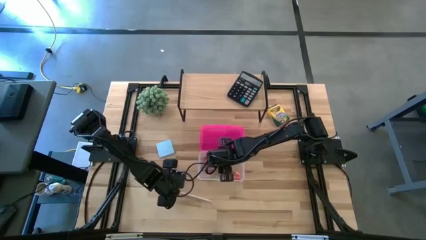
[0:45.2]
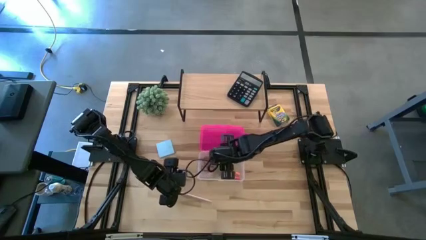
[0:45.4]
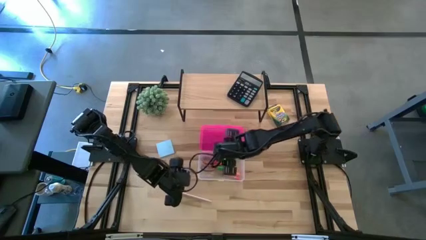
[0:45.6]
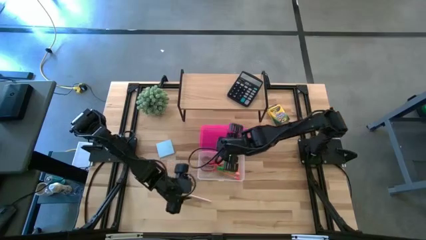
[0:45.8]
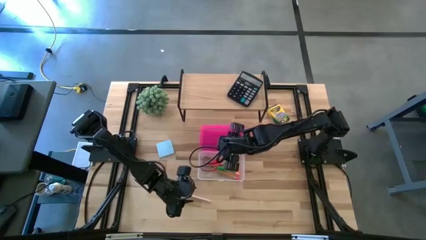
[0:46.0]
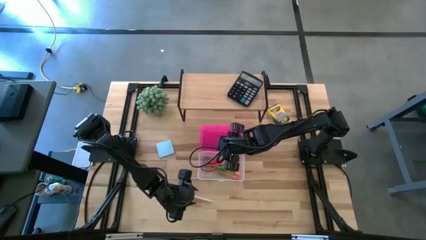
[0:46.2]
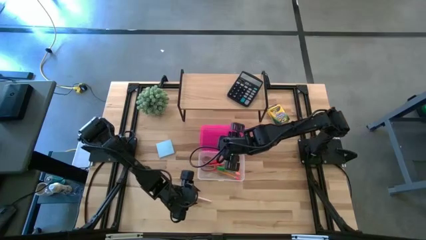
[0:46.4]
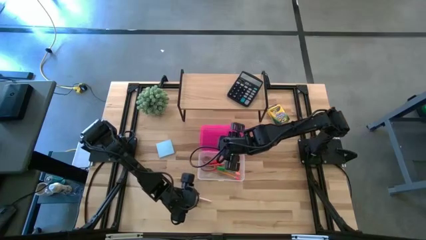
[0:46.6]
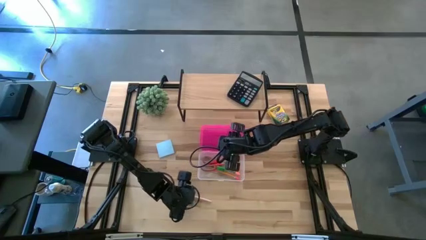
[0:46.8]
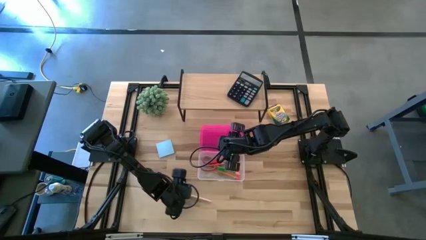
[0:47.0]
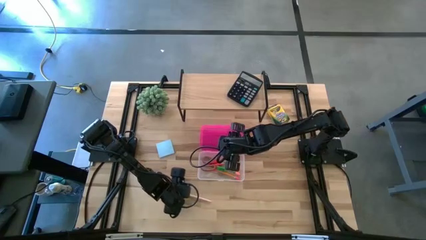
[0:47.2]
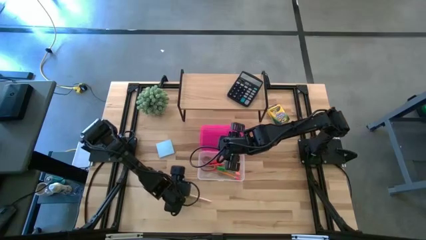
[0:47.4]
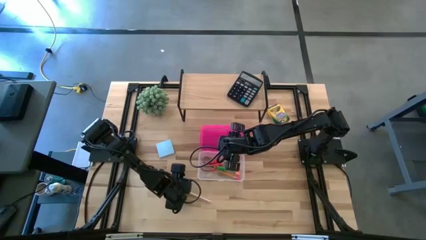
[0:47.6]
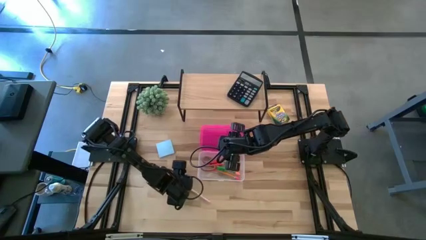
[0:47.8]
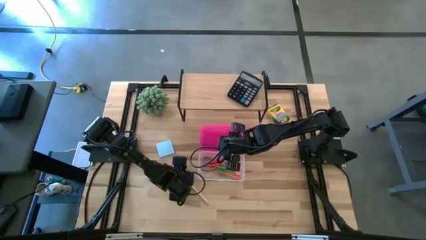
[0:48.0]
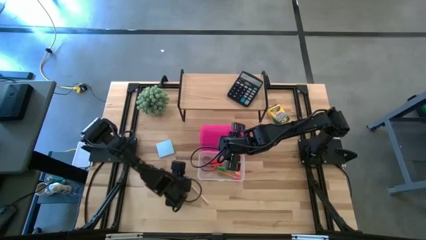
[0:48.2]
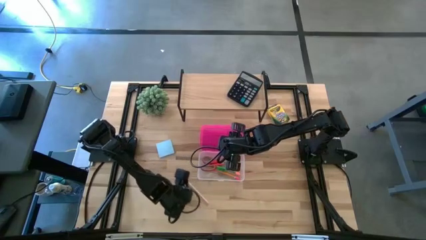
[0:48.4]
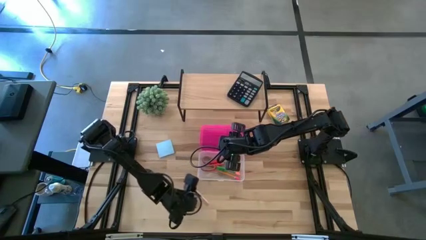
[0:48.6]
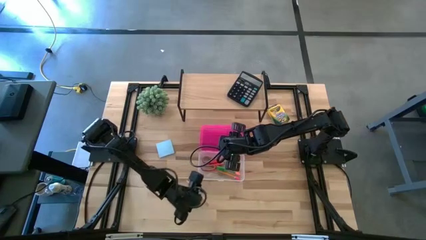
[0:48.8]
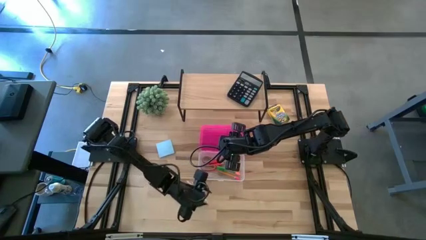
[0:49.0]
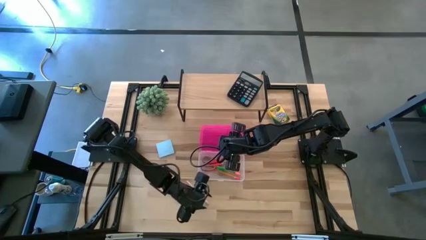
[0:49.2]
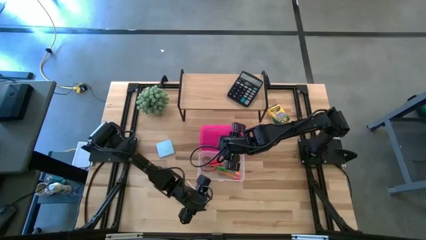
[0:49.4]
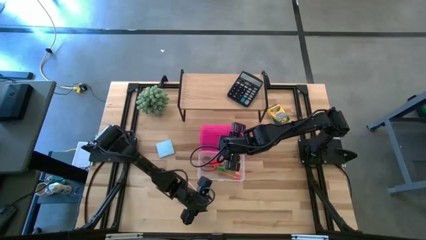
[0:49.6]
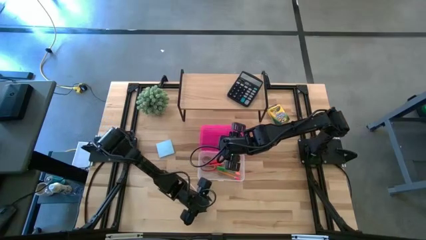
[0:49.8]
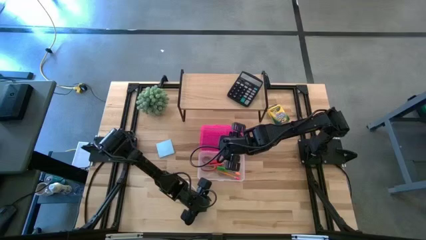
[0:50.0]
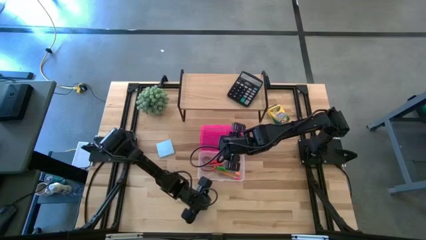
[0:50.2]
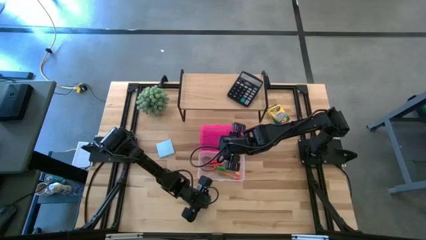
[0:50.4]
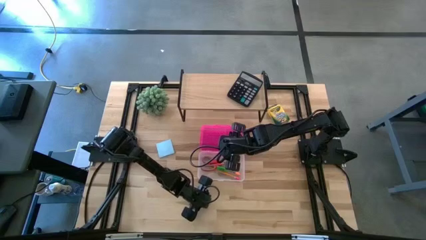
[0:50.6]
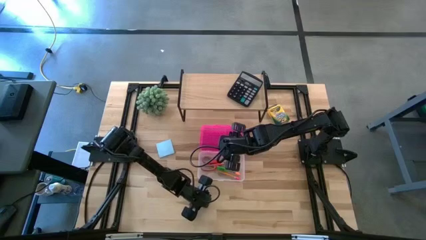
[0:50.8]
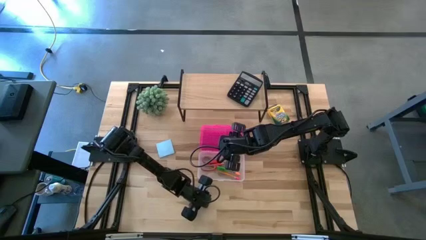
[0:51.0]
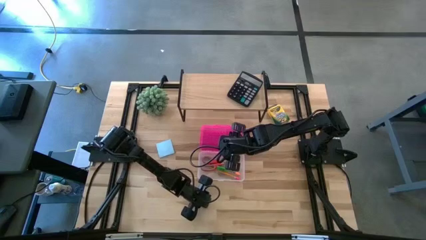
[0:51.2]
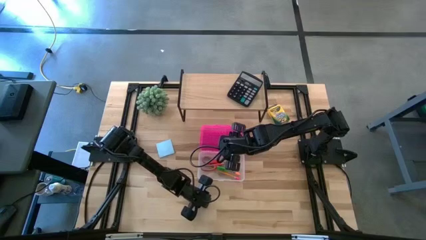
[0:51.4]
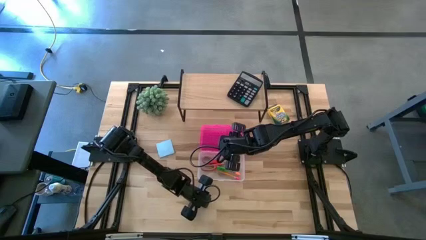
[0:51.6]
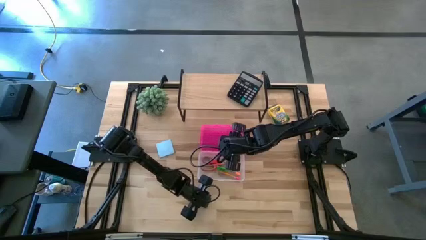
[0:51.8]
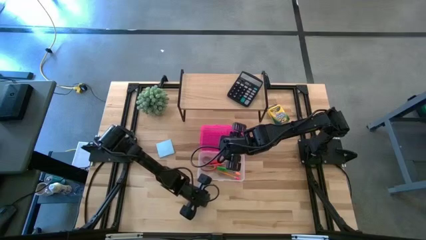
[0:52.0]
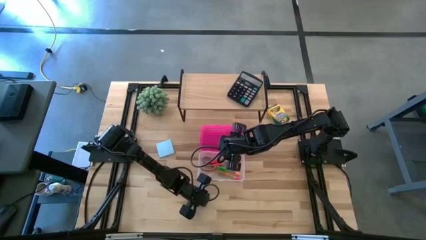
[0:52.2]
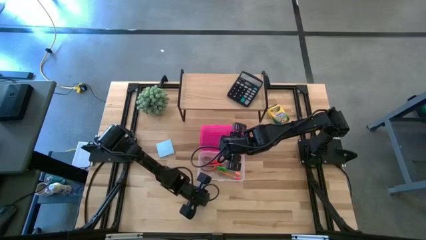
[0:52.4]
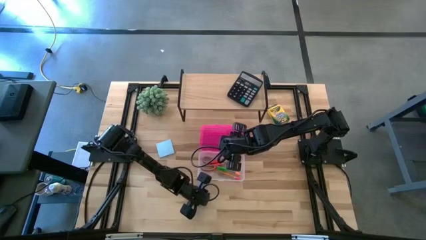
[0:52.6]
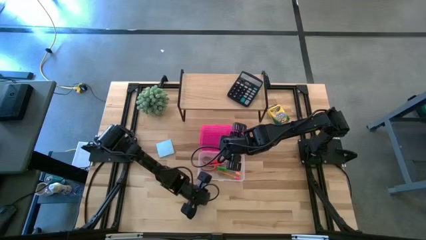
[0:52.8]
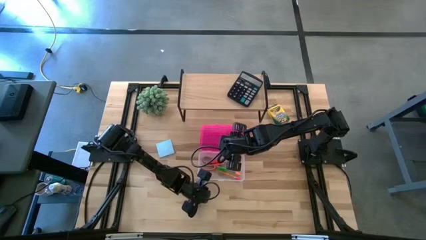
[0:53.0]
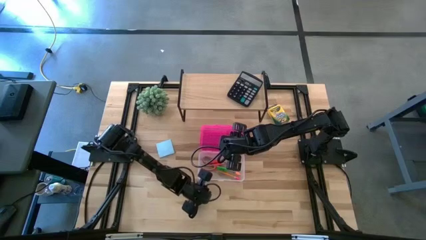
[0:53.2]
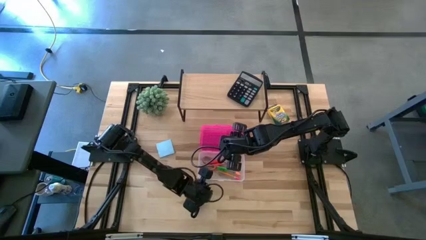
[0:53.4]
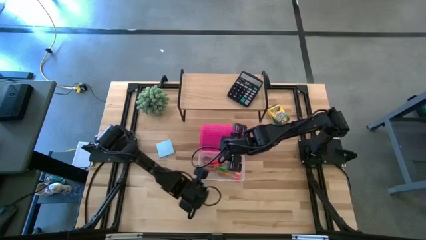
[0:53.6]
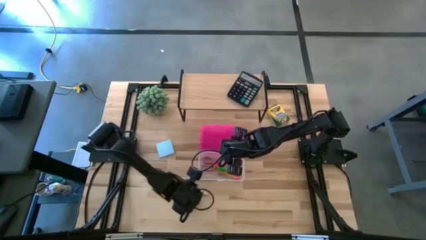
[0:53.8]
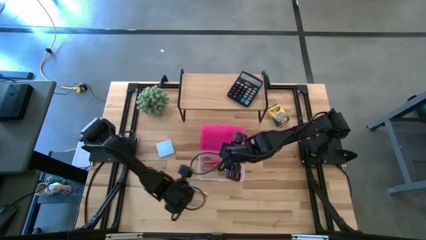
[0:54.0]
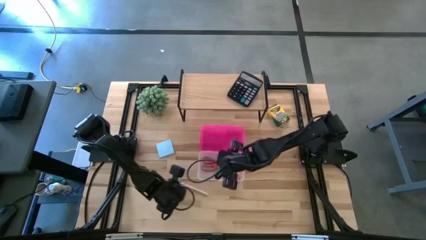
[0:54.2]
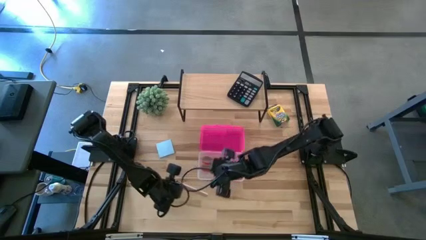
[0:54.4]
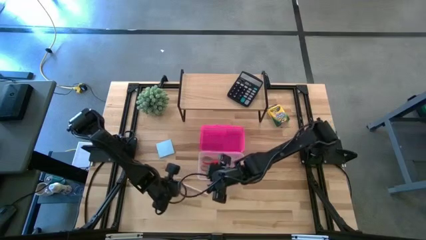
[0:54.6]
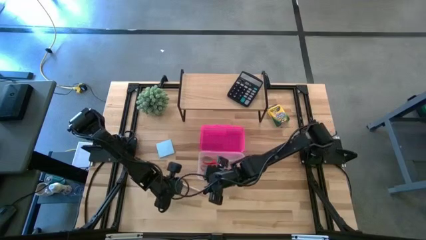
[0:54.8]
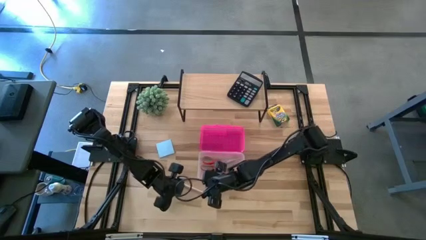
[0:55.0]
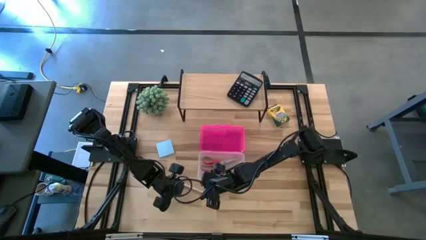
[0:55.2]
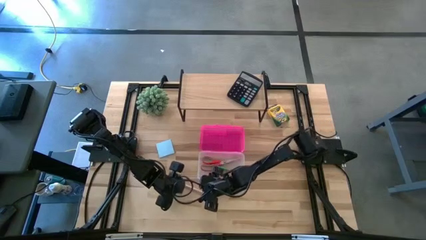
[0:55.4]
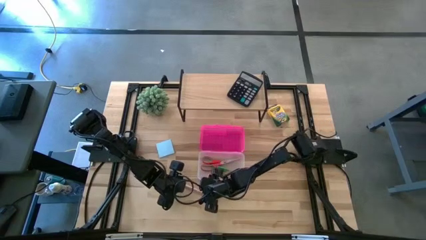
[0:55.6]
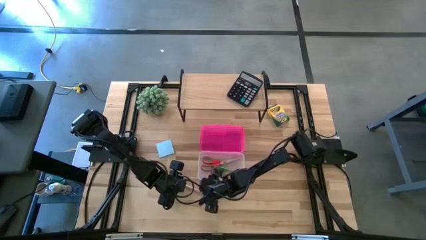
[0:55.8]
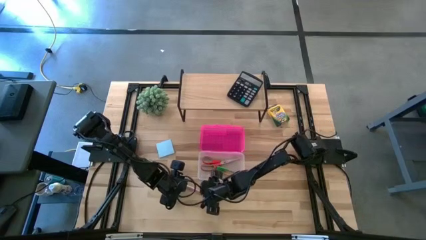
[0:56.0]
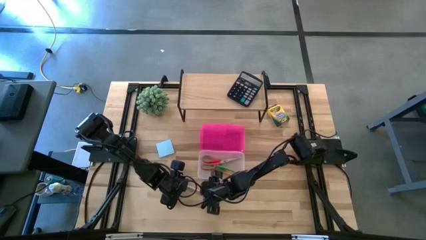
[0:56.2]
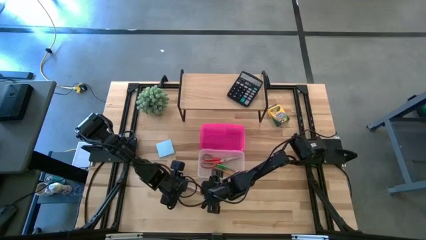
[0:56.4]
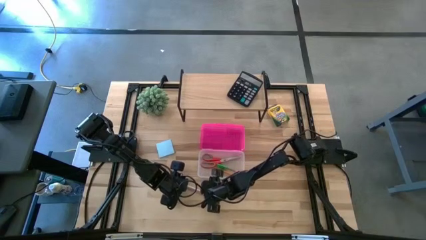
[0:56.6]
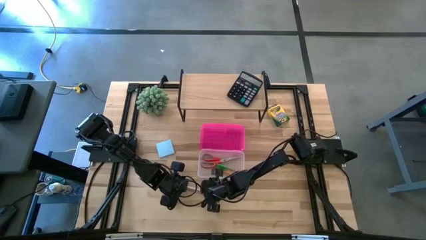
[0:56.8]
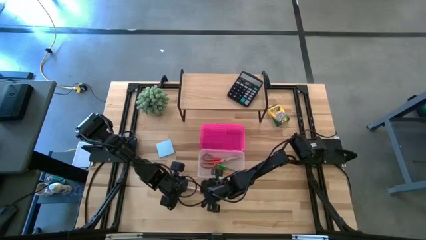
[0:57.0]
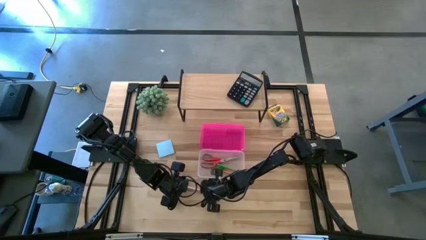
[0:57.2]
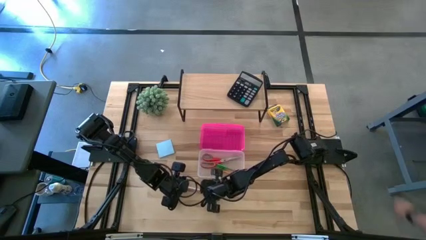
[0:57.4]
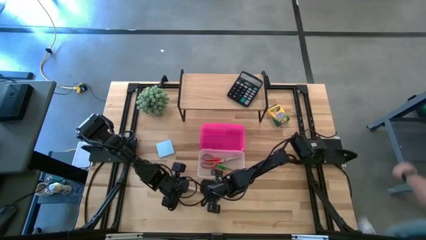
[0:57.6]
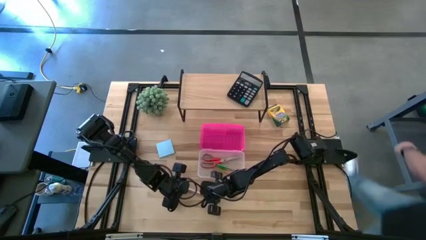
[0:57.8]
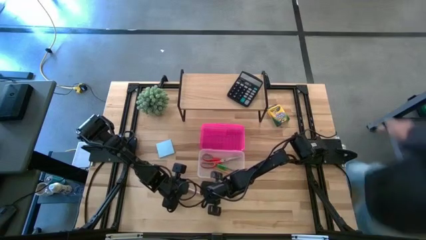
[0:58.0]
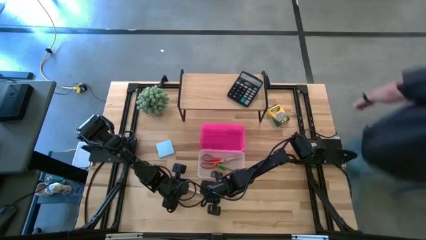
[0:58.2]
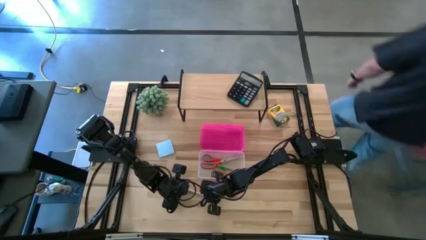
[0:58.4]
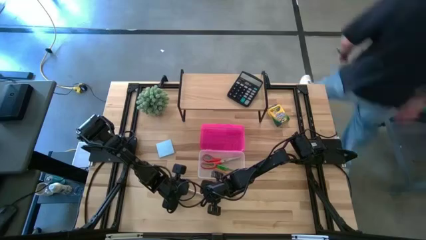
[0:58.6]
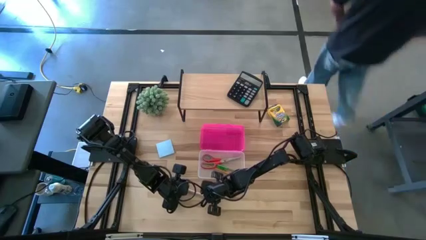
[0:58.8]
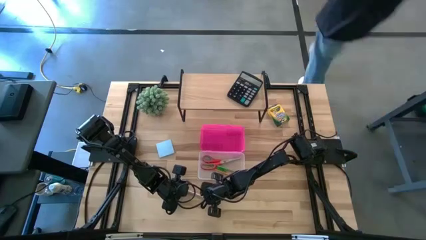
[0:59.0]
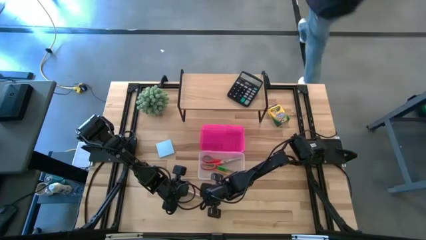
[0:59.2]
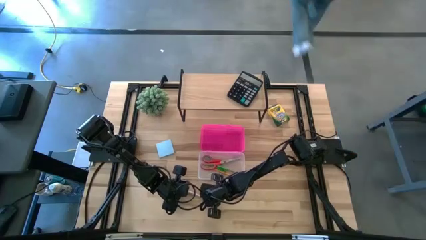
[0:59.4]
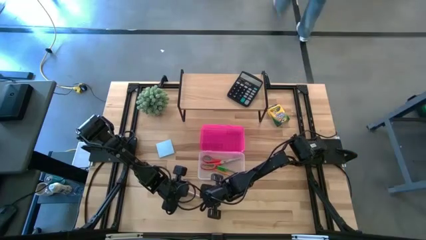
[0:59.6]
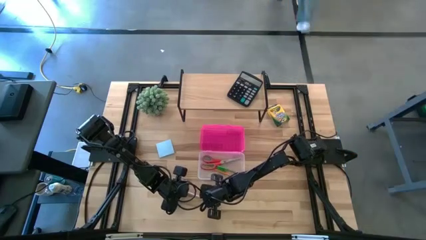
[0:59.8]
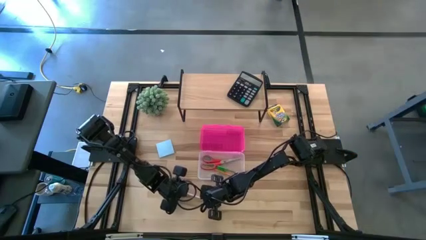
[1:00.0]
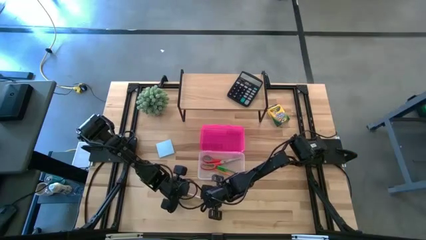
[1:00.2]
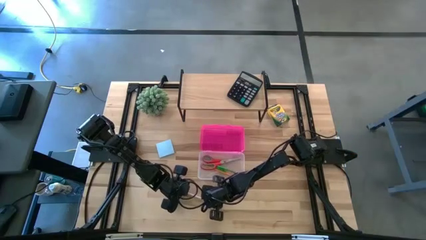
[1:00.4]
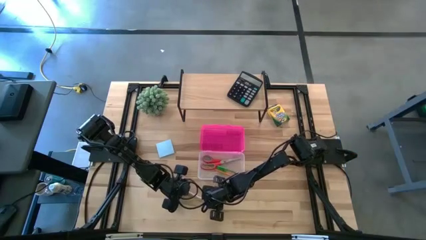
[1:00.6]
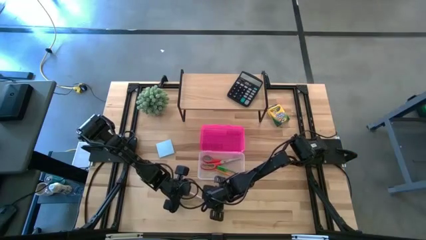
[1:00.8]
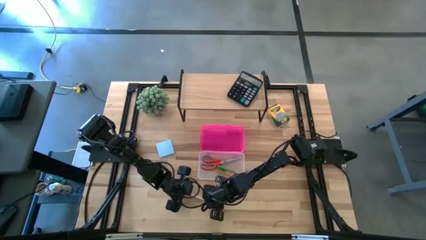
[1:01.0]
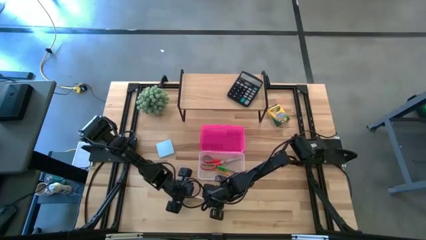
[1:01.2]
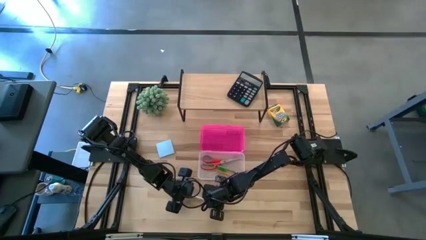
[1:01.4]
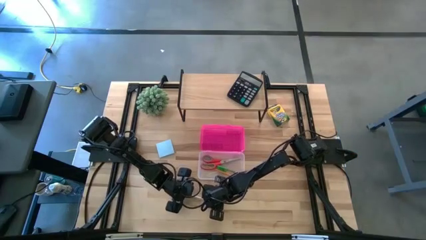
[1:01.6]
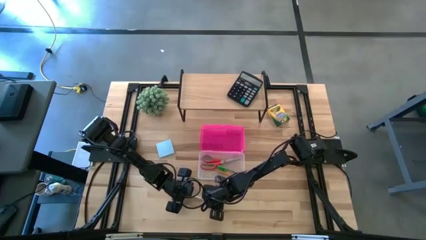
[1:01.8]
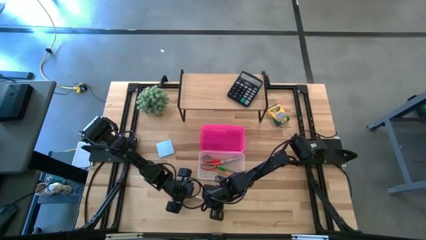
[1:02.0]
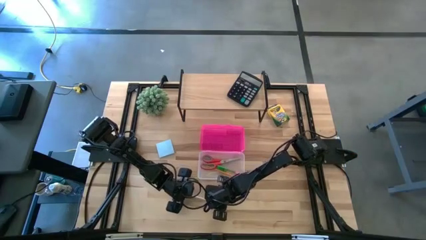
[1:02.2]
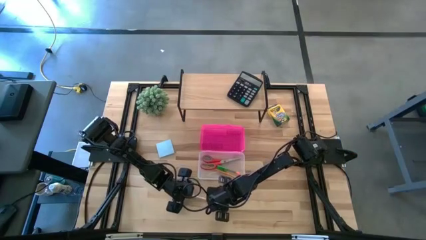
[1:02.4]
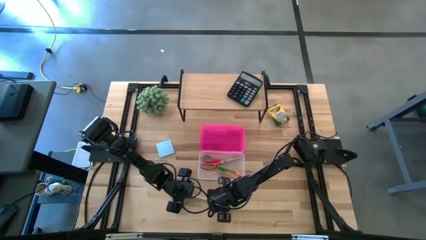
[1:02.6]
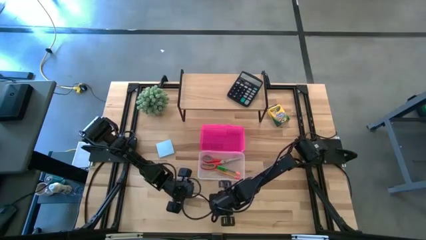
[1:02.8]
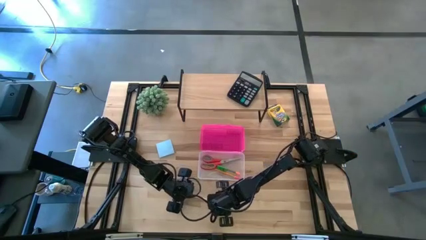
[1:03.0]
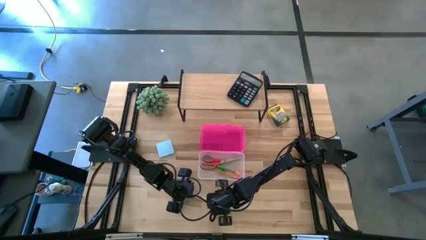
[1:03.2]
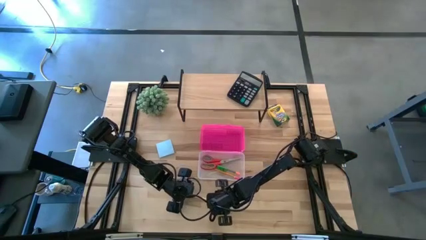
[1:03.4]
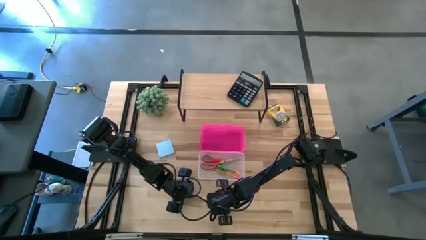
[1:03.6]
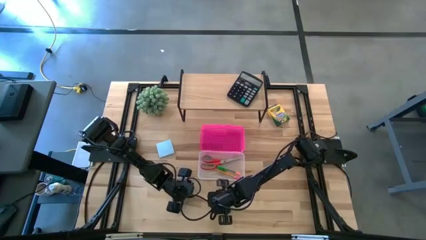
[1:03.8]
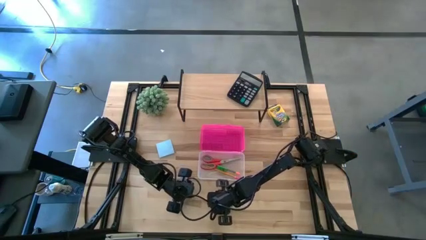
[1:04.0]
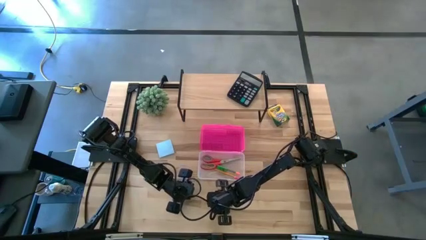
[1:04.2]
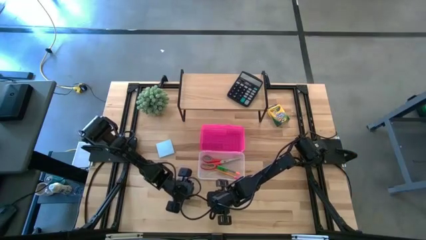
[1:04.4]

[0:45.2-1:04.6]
Task: Pack school essentials
Put the white pen into the transparent bin
